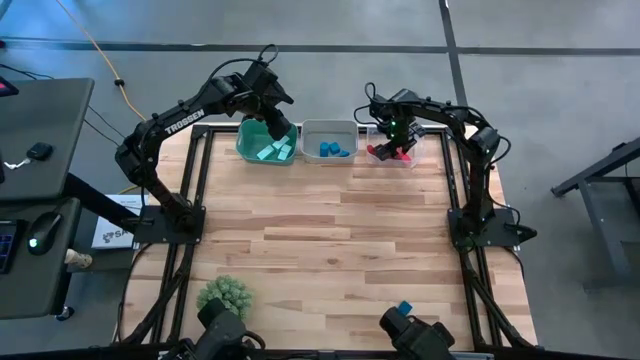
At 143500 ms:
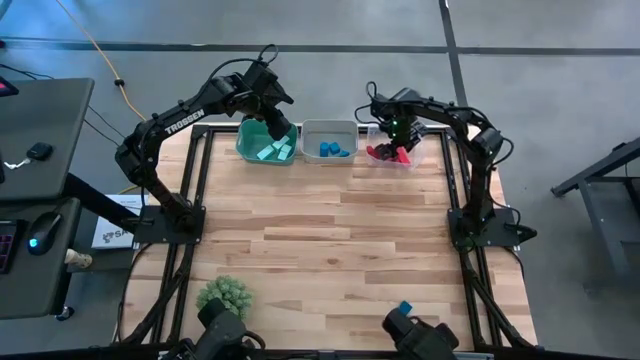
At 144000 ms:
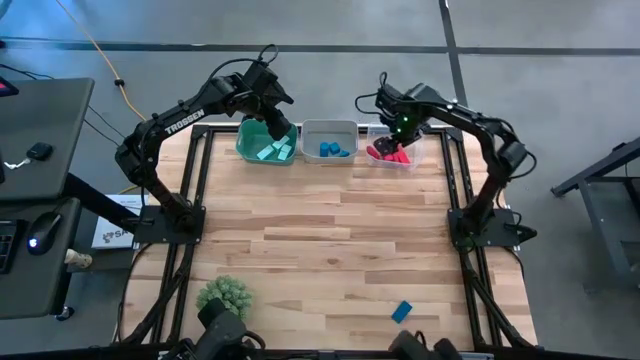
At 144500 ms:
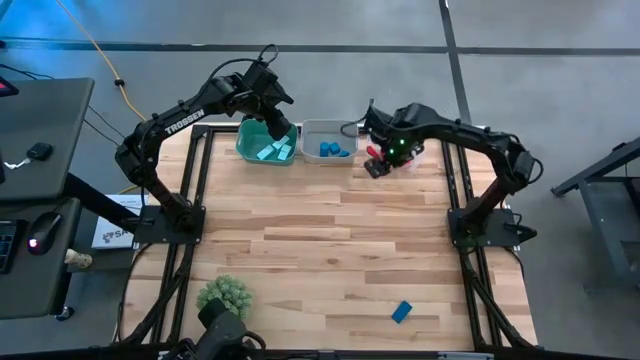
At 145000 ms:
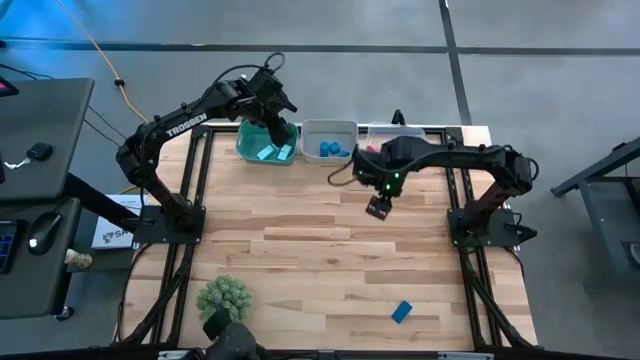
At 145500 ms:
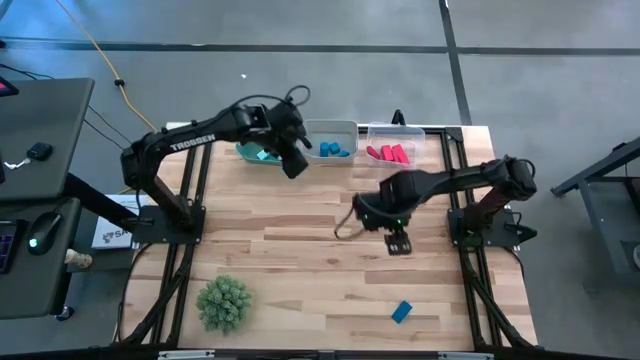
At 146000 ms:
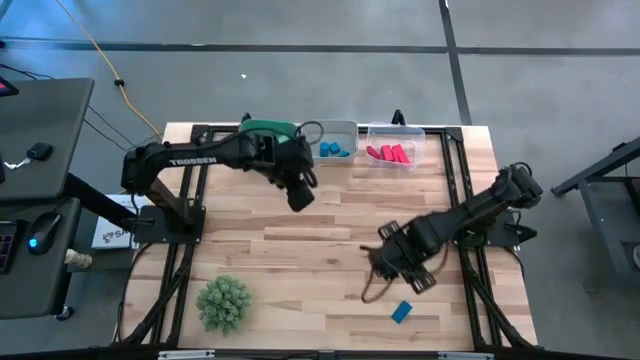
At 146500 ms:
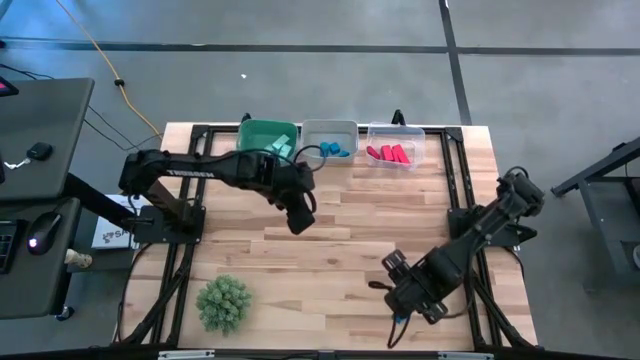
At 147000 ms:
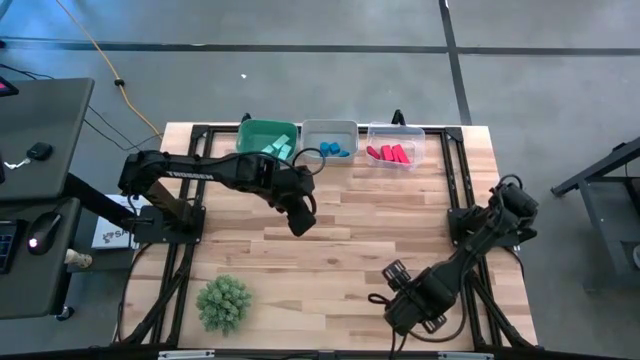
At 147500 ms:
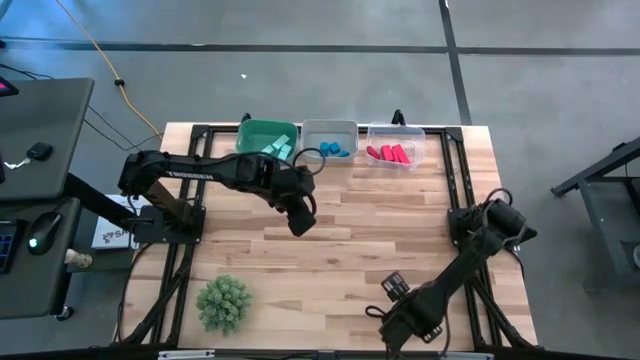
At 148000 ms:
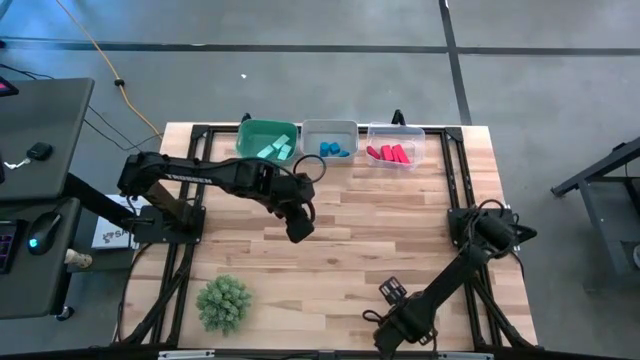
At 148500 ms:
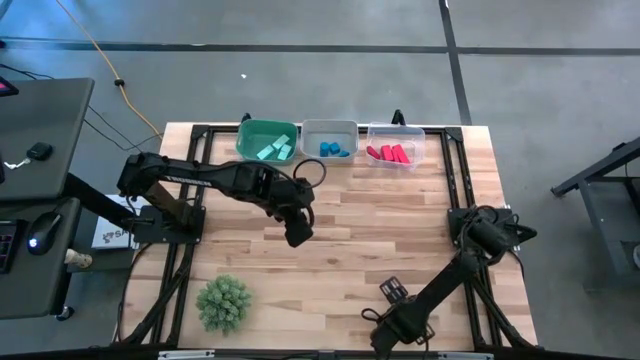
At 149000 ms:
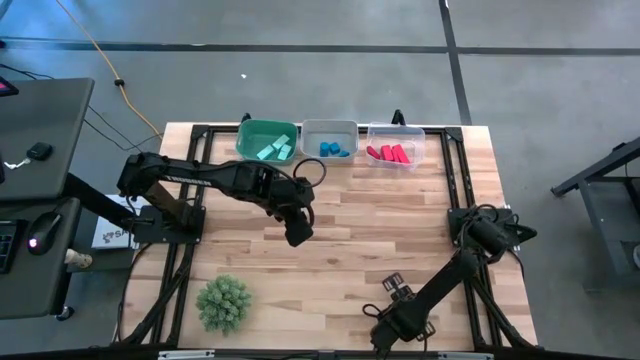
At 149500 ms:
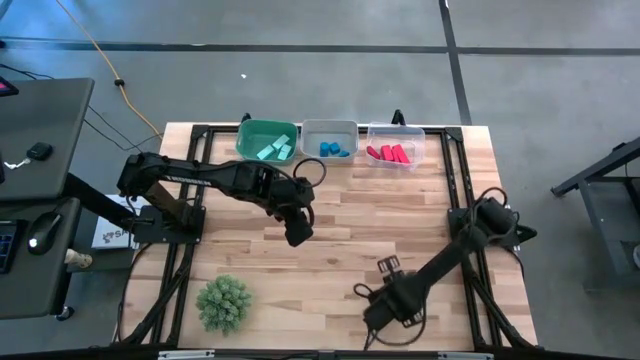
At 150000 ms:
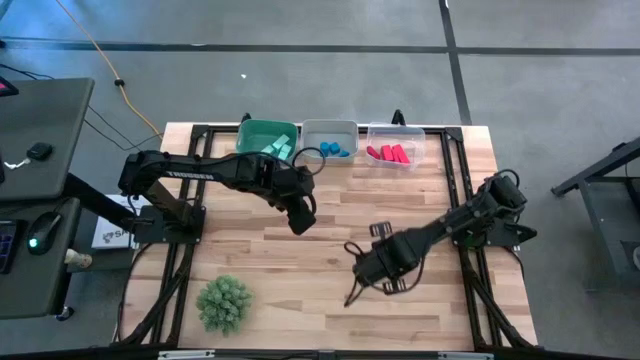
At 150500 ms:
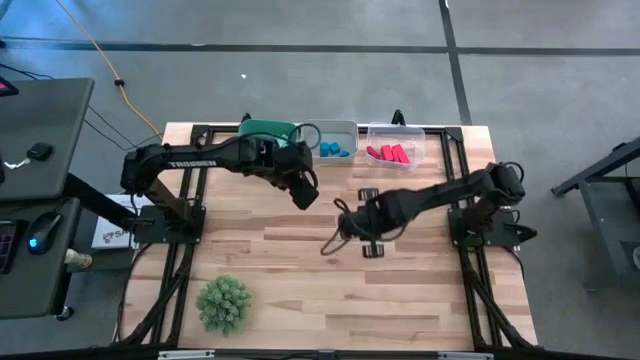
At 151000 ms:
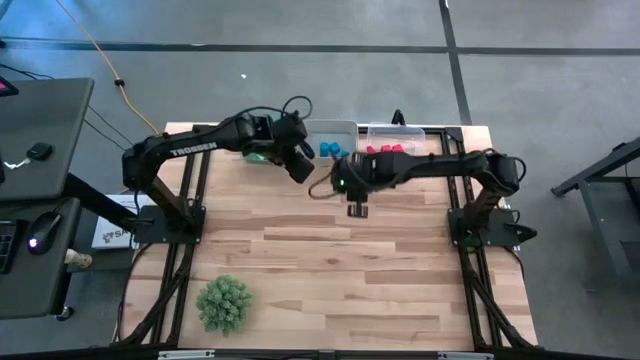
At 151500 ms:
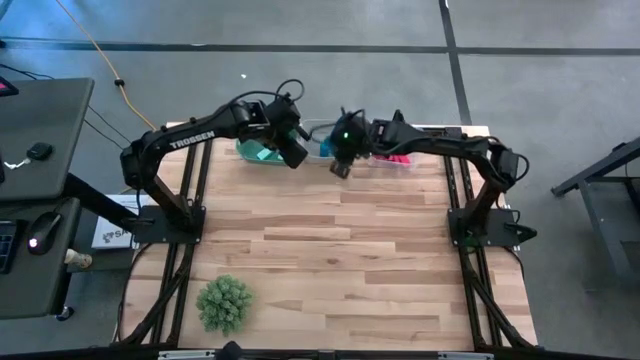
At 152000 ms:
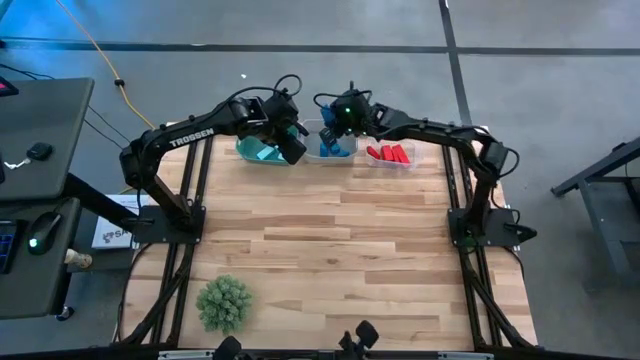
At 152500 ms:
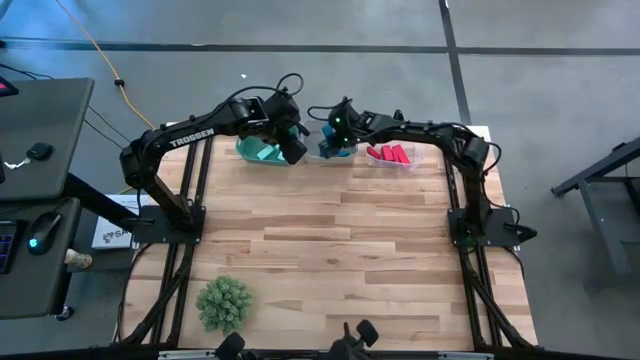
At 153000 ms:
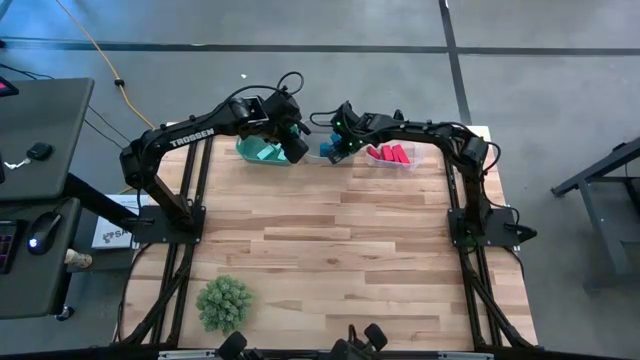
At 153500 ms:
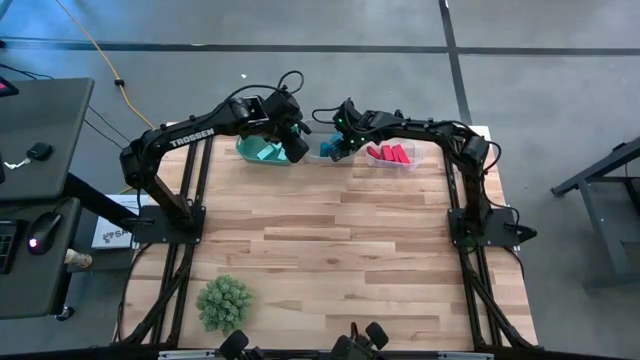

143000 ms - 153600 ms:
Task: Sort & place blocks by color
Put the blue block into the gray bin

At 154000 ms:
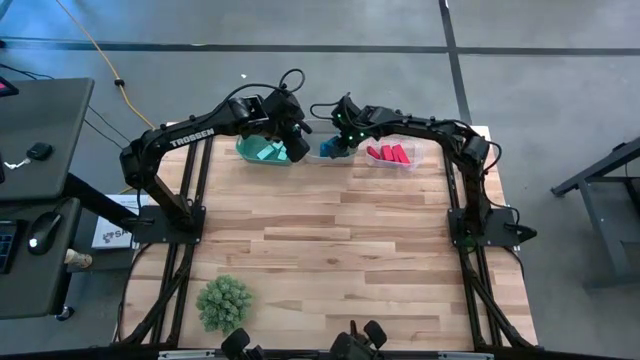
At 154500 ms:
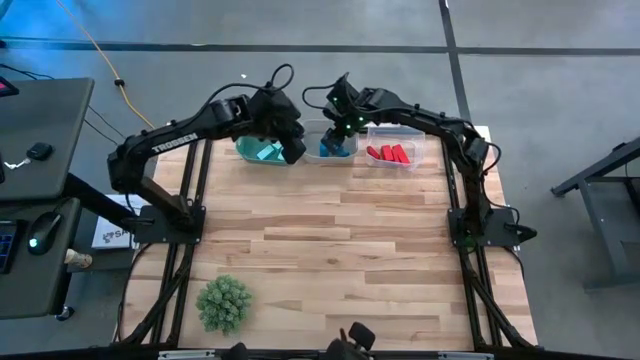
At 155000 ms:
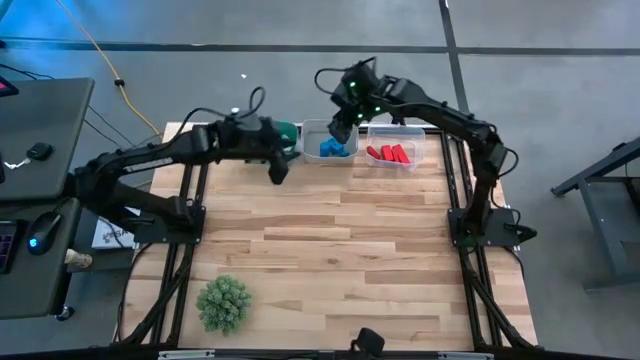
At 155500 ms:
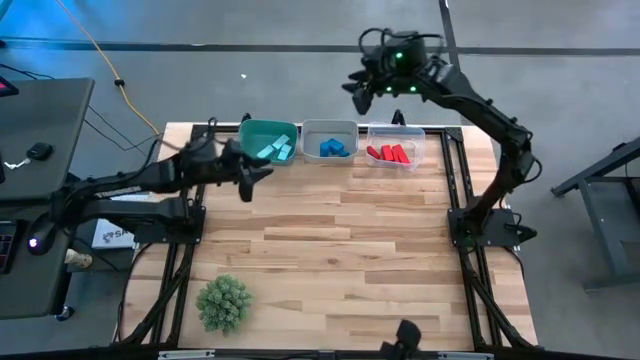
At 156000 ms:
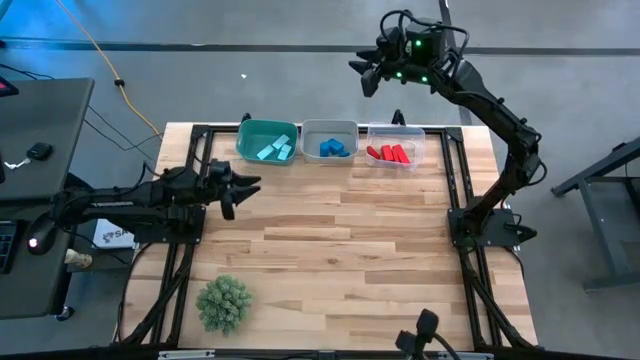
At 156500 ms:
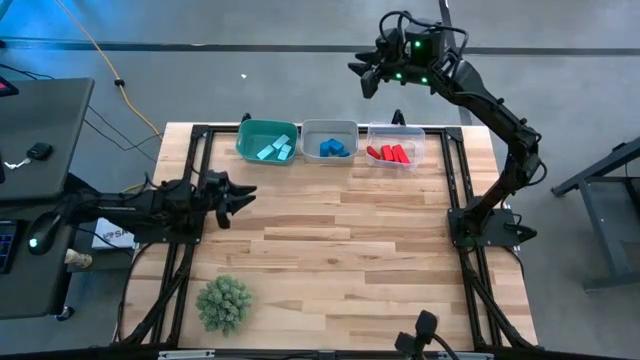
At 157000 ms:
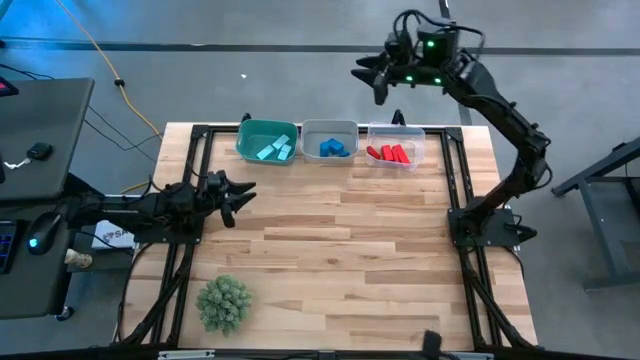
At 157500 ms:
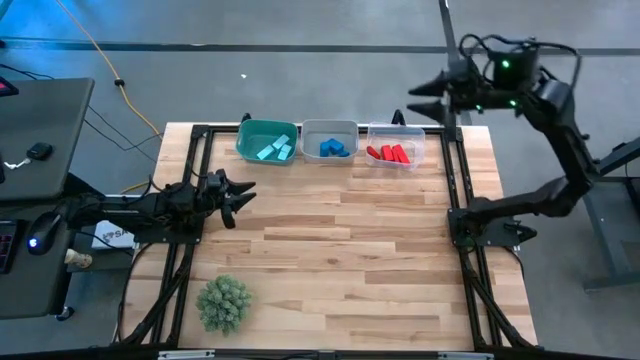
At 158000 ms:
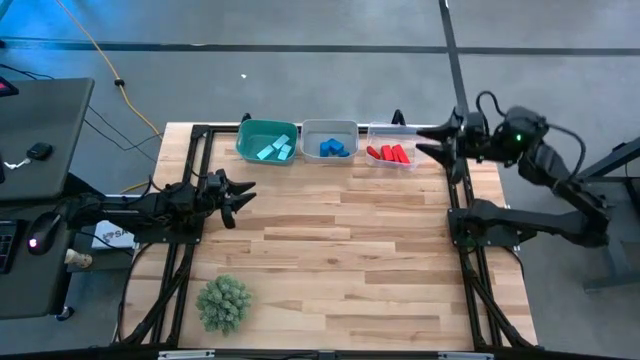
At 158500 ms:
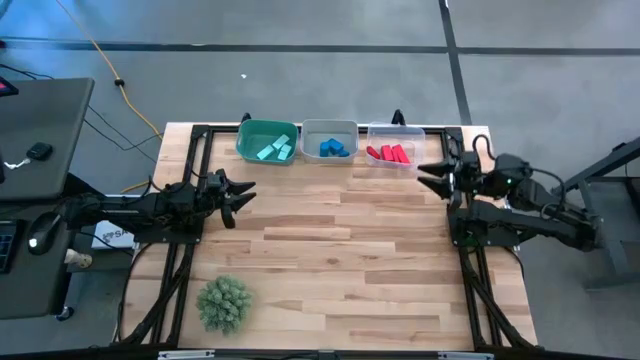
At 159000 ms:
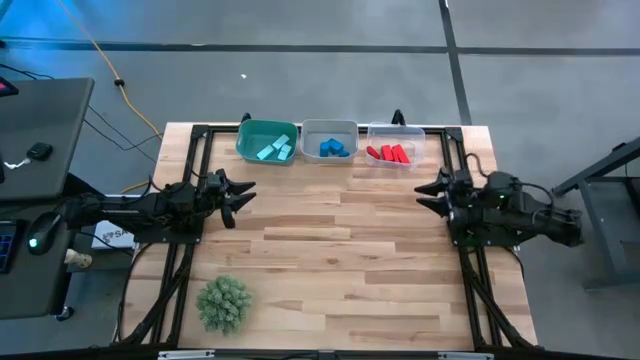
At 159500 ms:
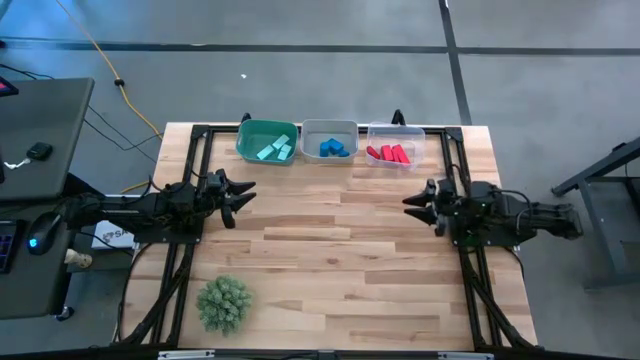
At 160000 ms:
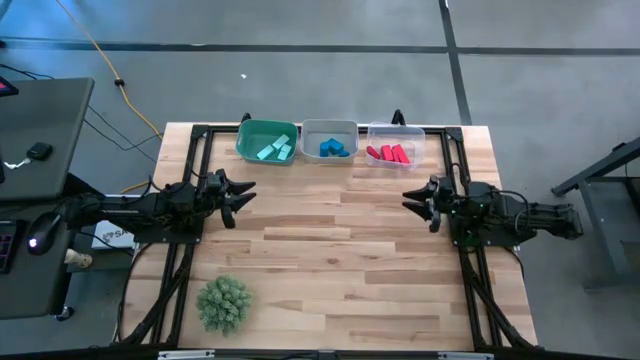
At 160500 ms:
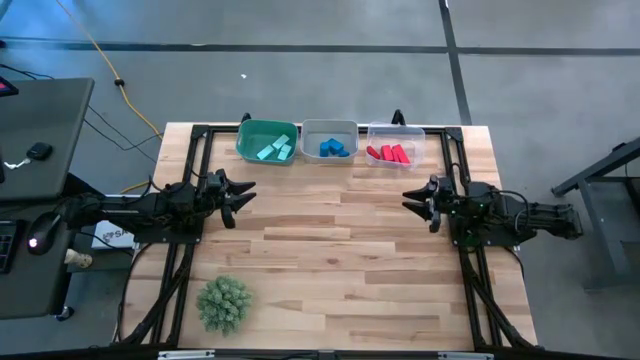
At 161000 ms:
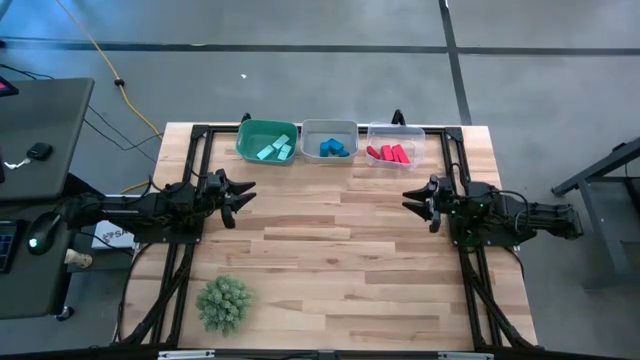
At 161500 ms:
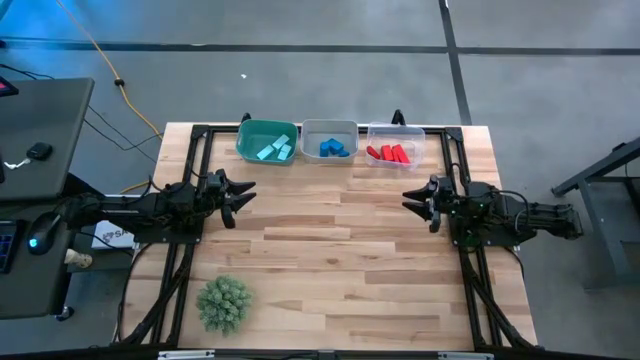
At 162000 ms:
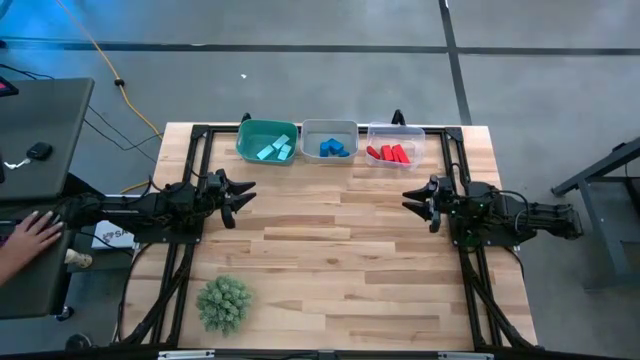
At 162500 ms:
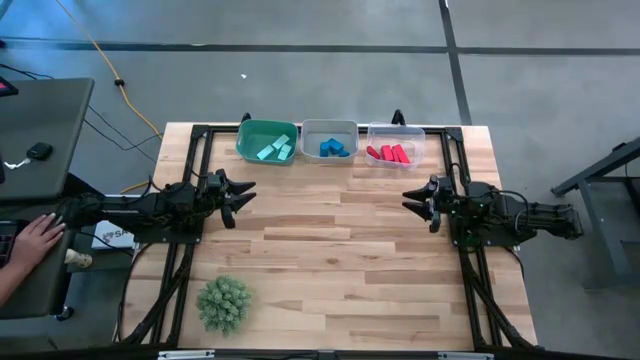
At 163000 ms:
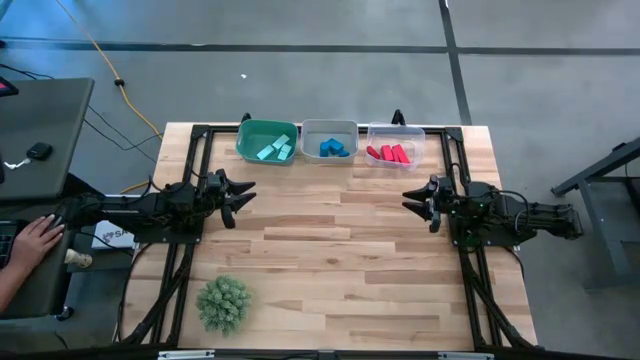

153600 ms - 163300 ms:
Return to Home Position
